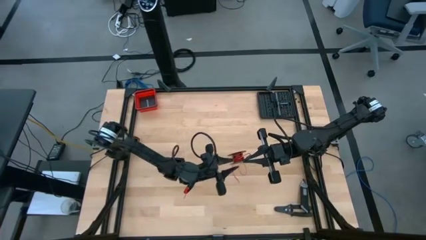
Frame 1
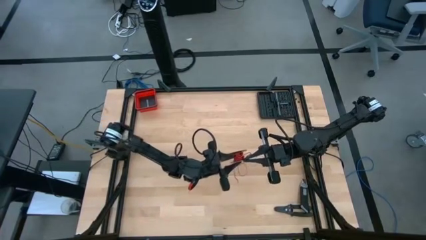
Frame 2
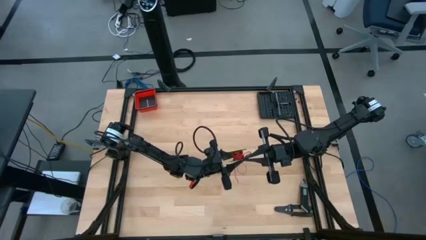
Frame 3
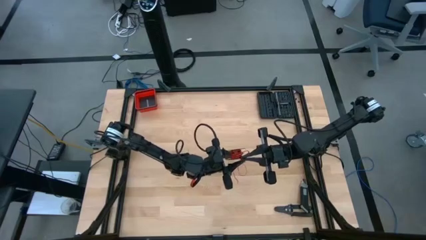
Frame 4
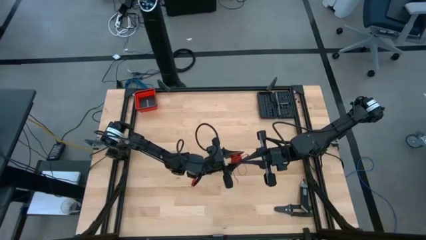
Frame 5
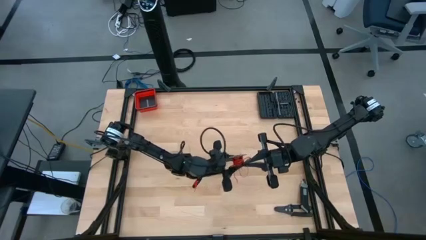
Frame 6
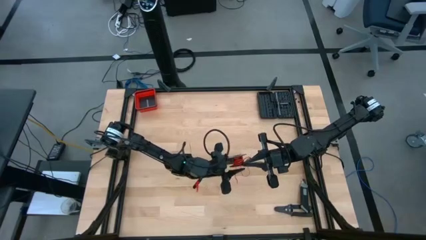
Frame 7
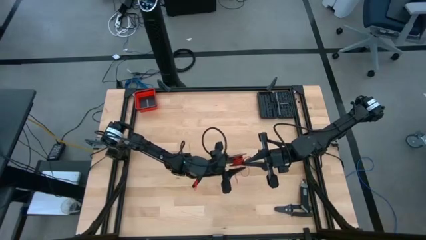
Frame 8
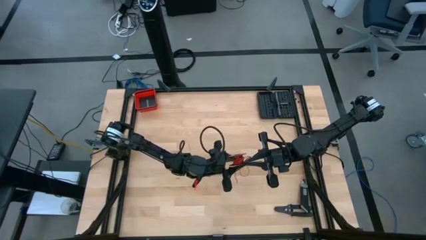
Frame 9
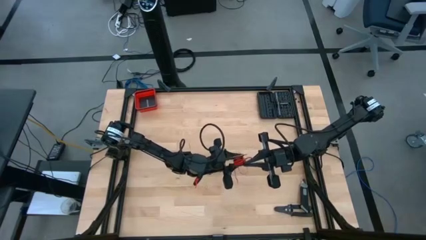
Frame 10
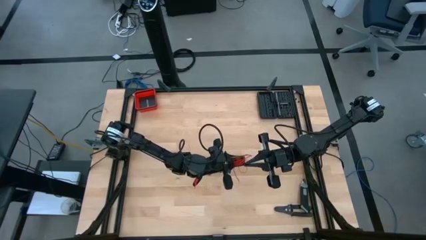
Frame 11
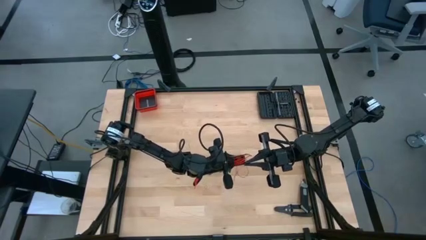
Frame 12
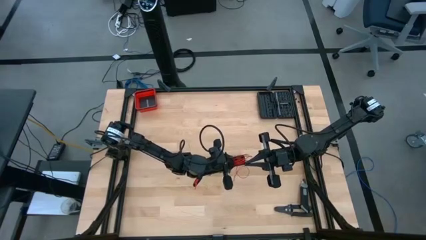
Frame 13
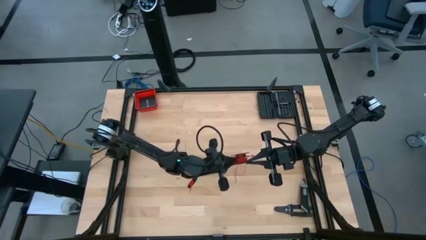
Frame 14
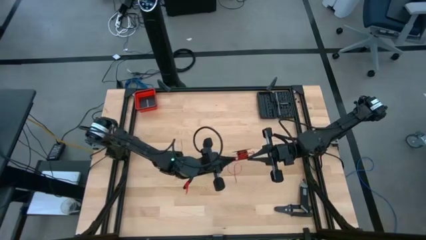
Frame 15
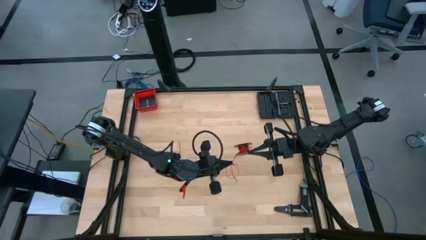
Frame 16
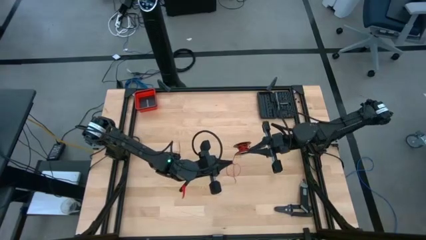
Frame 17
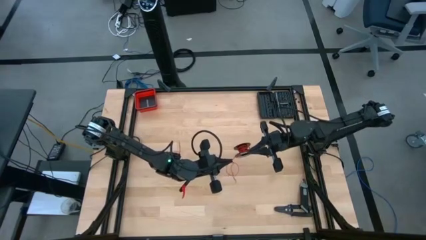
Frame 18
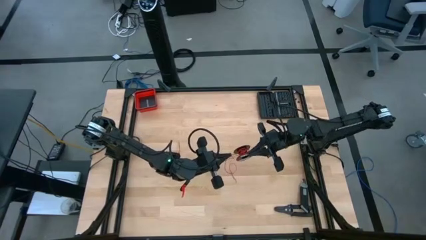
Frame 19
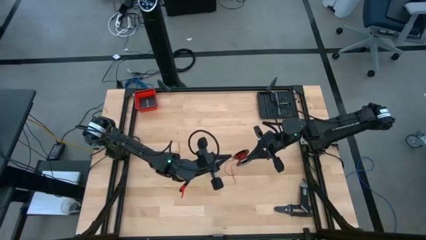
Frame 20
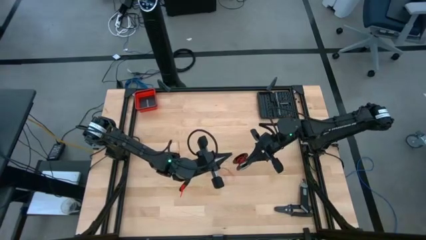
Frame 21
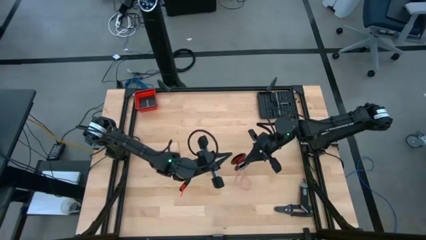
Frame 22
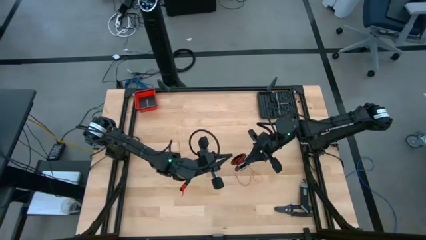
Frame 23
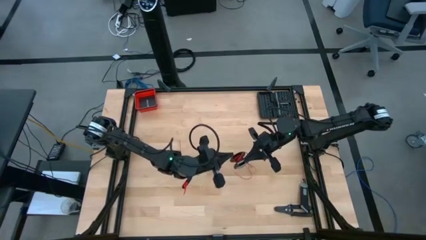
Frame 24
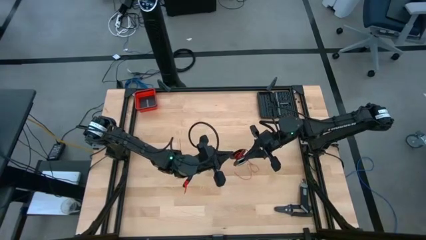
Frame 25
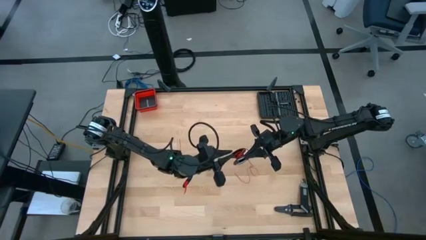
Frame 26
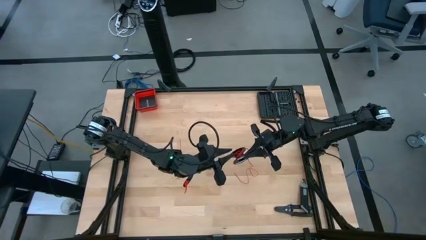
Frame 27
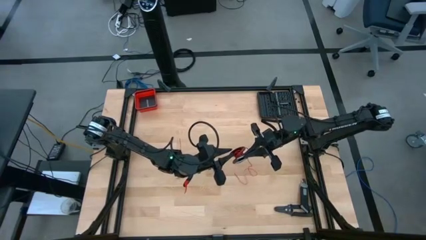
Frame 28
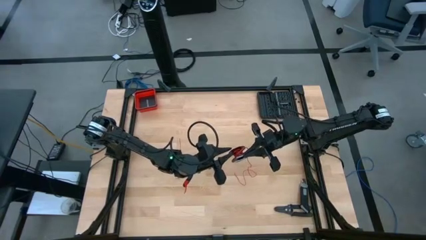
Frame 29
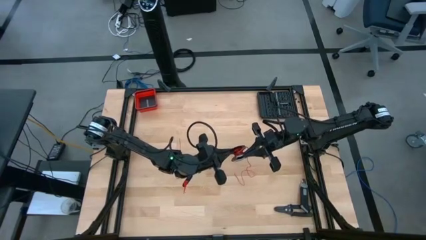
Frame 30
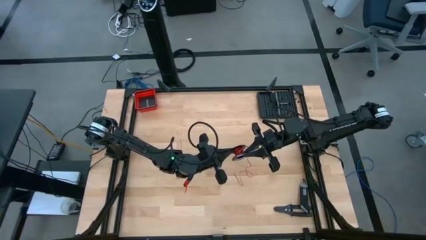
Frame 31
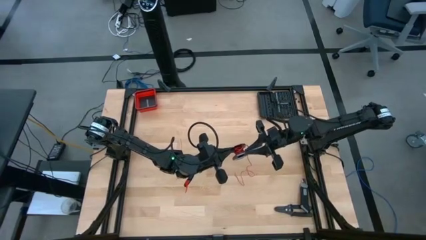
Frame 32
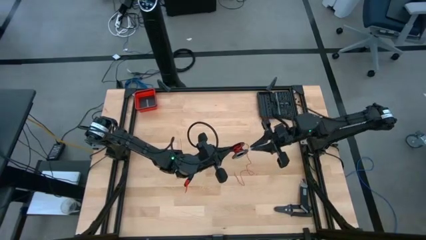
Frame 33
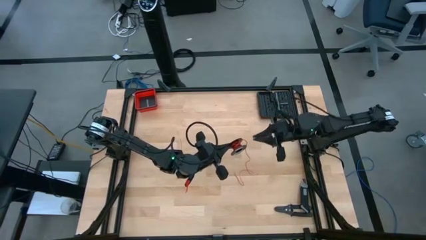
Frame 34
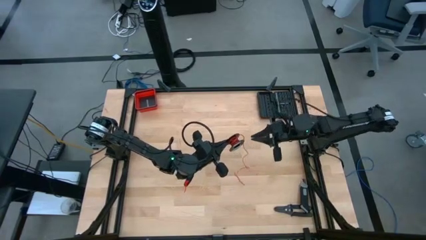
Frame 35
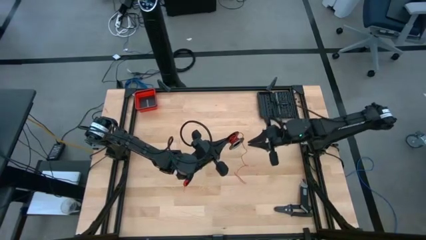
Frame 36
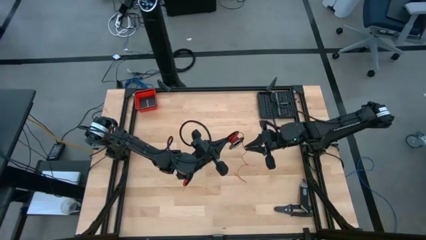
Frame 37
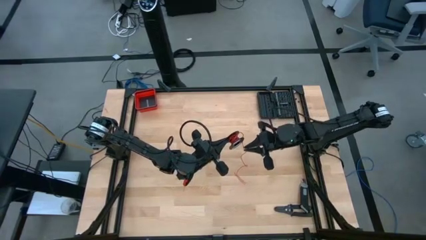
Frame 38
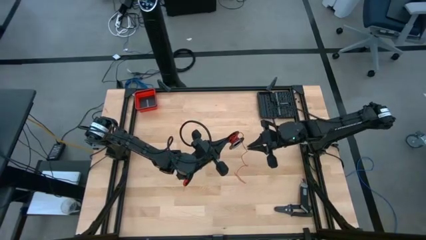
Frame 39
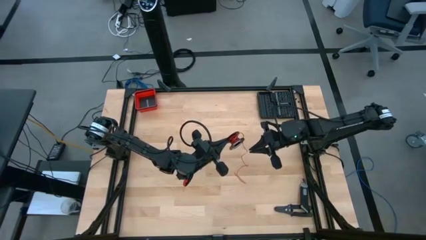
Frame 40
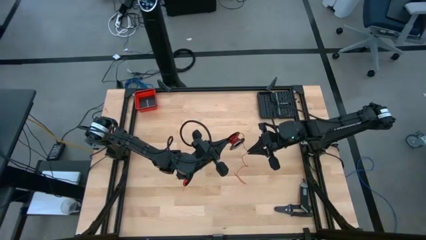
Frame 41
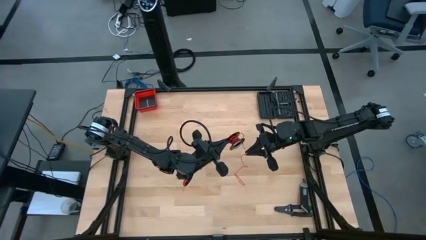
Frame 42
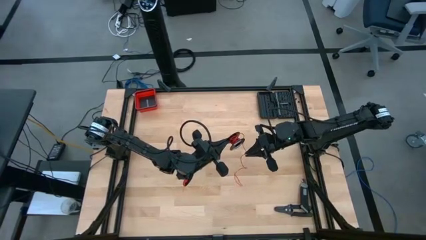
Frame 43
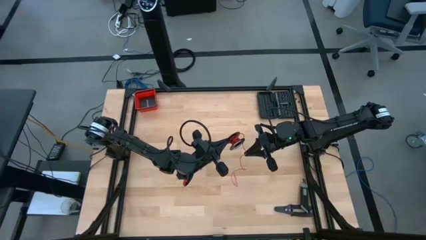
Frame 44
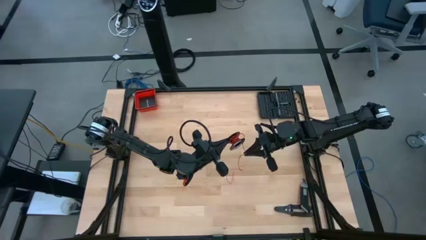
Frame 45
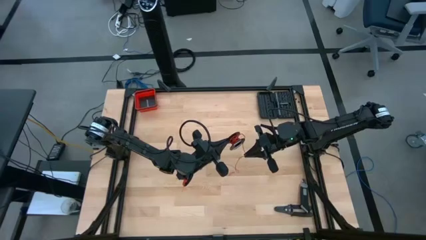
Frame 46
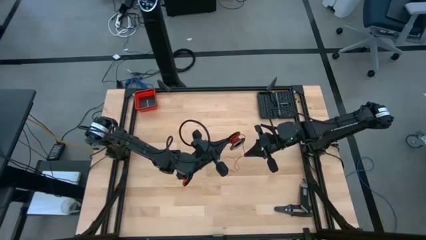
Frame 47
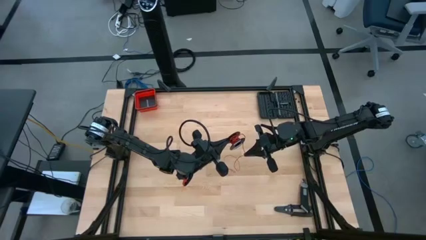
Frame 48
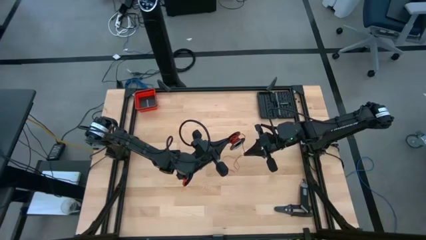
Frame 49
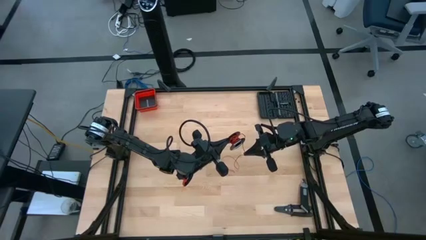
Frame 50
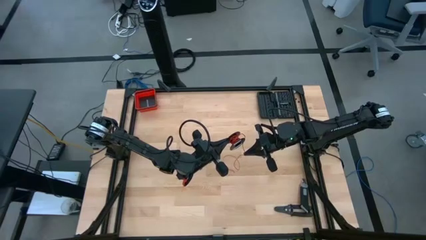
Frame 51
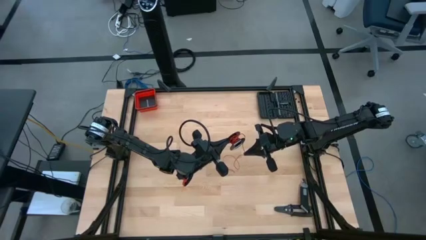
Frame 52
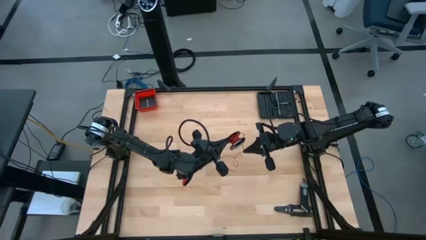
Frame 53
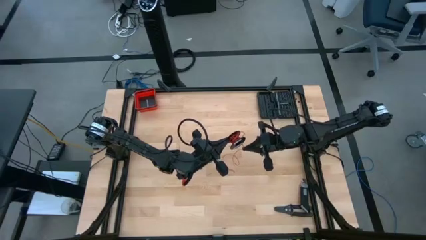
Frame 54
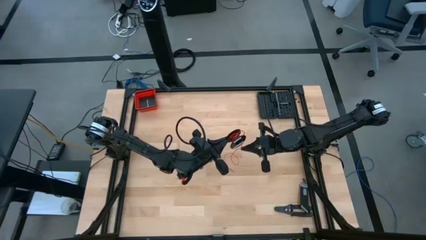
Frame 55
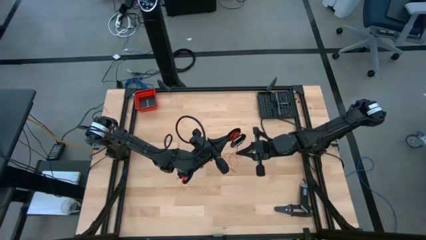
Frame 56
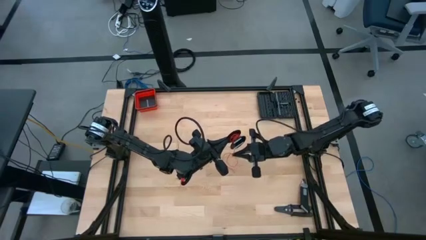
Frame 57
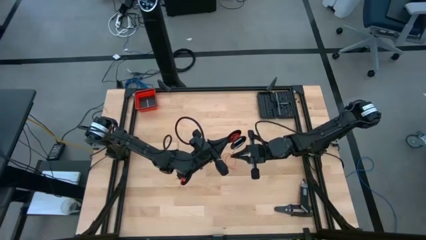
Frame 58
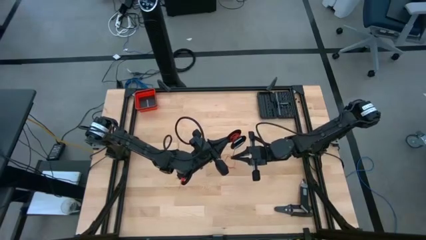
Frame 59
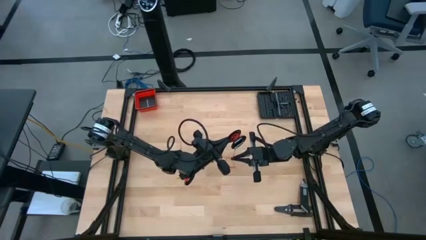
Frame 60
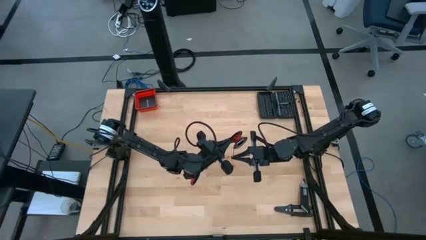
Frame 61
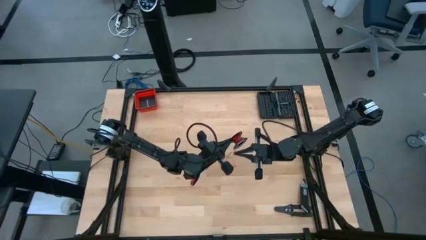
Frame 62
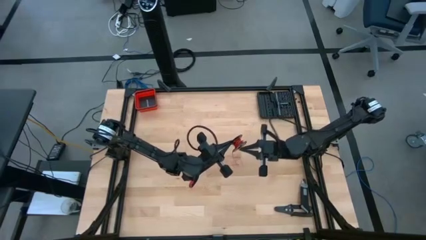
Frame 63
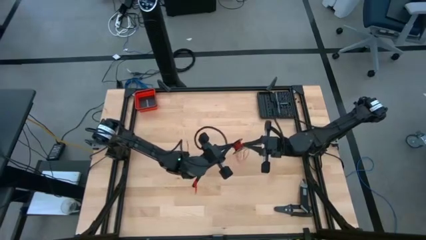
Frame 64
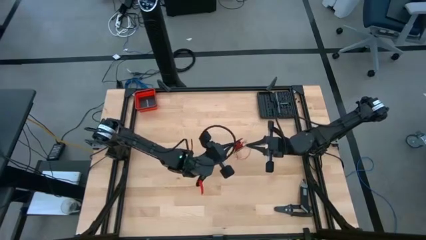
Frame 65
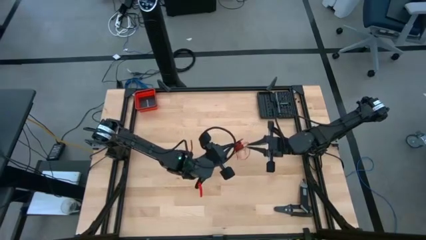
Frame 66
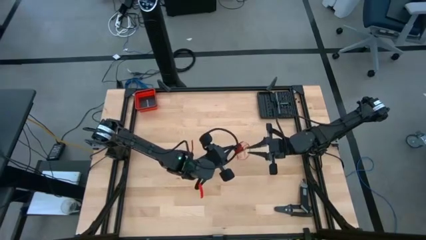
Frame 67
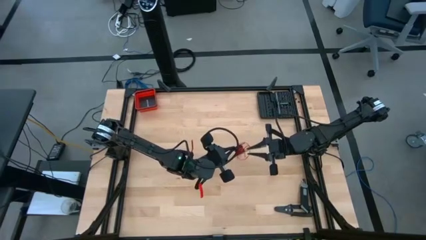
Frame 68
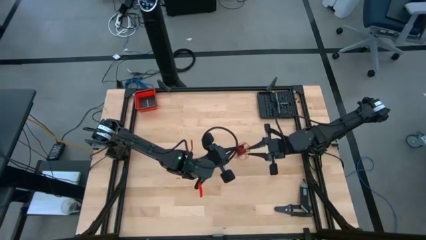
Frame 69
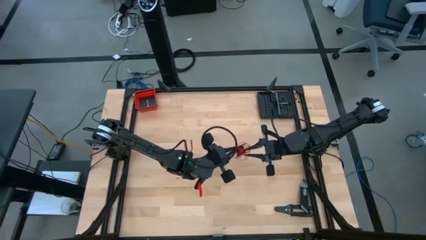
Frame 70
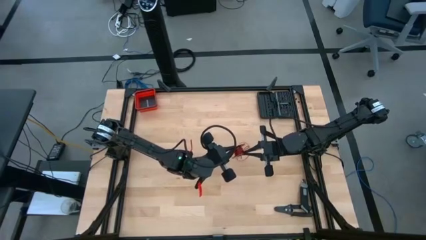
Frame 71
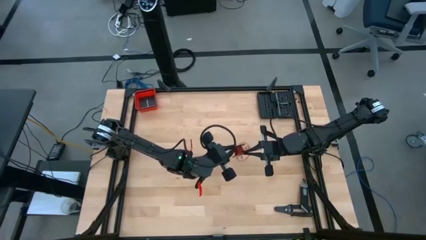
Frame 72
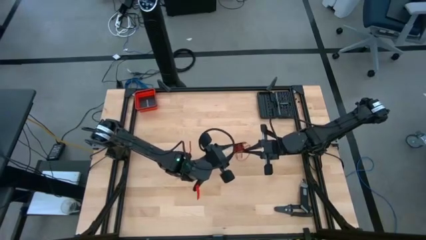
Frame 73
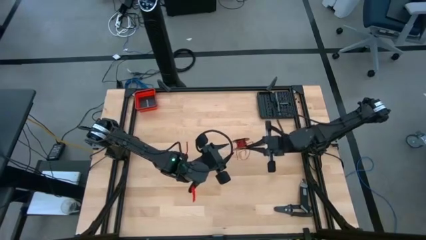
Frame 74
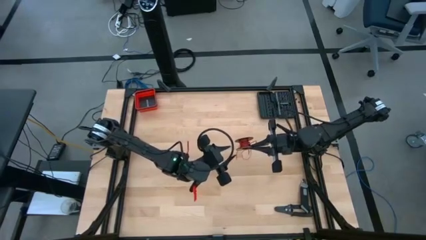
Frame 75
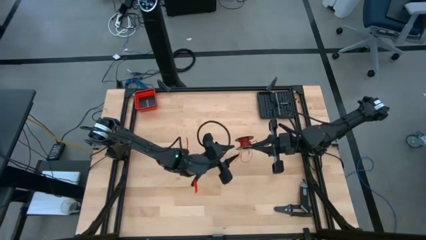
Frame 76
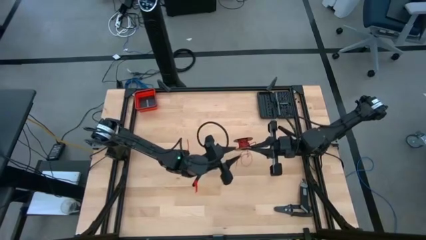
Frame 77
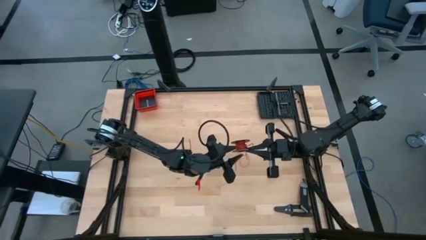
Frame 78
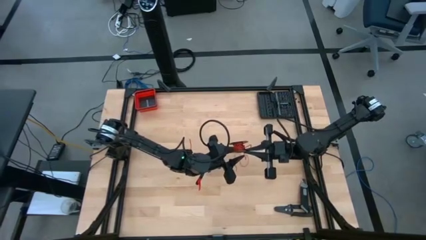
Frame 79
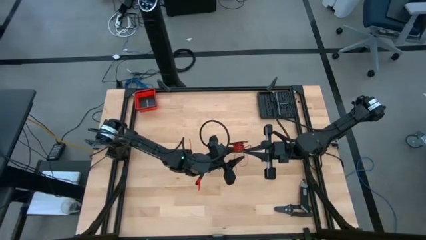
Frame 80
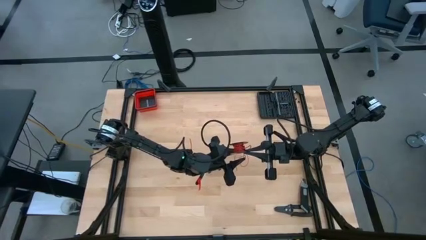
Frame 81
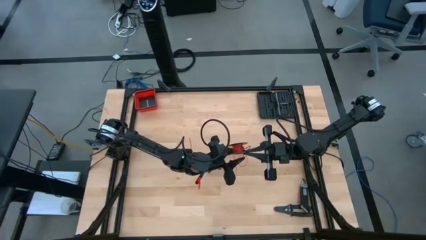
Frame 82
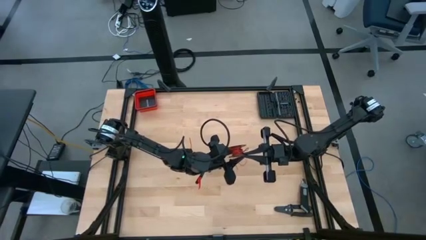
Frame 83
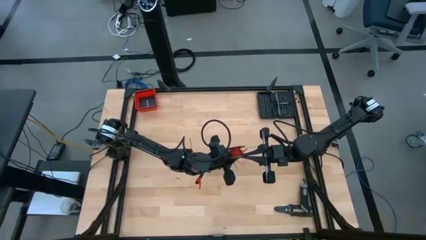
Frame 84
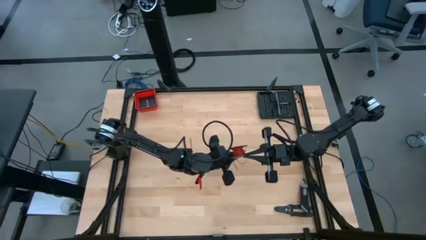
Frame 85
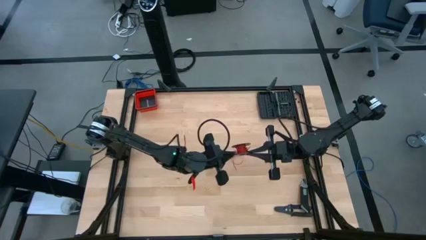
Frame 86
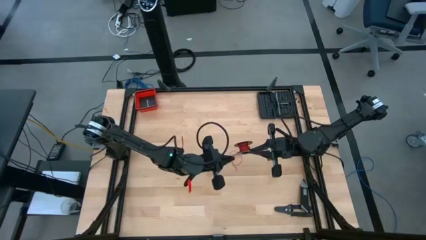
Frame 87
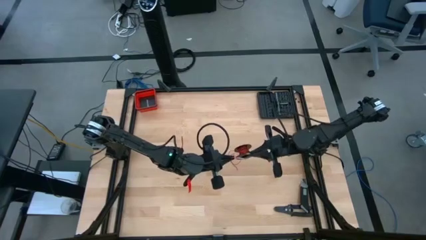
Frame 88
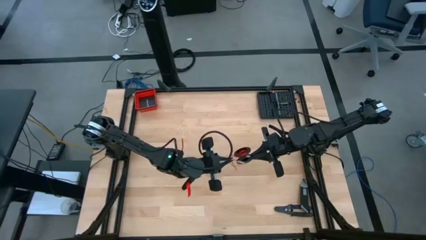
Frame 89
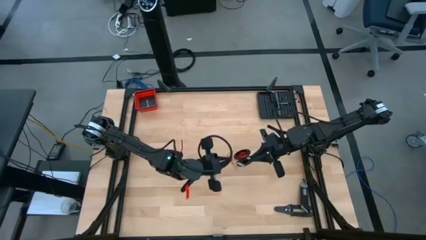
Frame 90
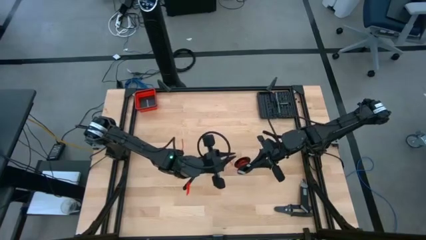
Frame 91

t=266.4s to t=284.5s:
Task: Coil cords
Coil the red wire onto the spool
